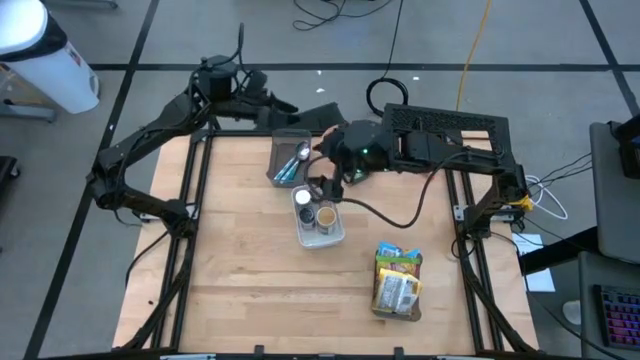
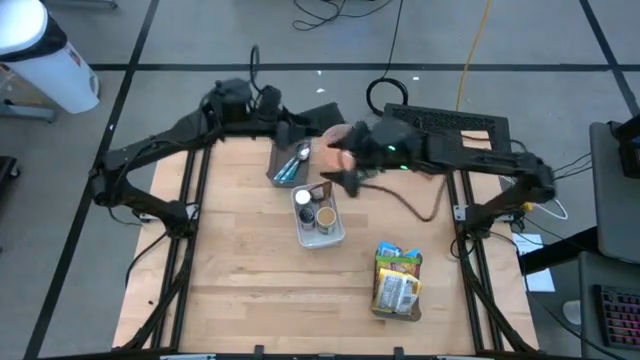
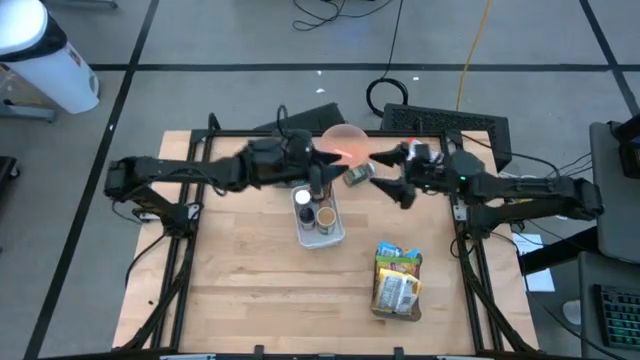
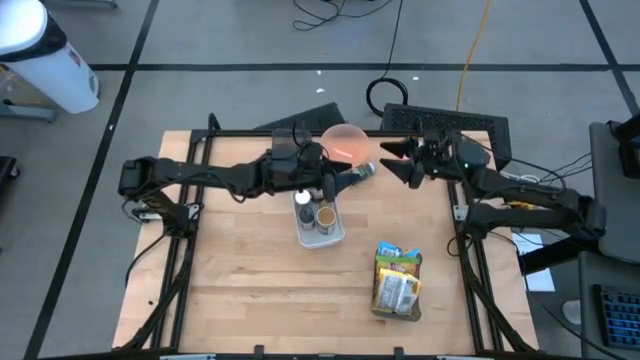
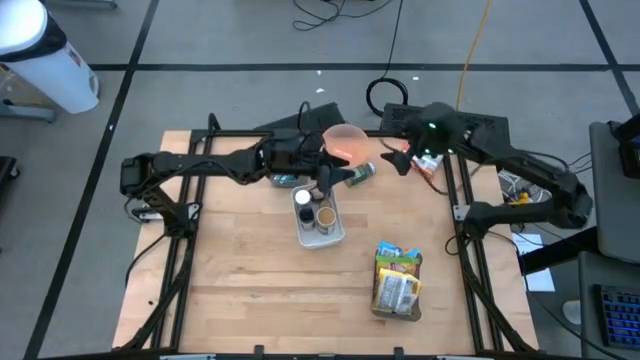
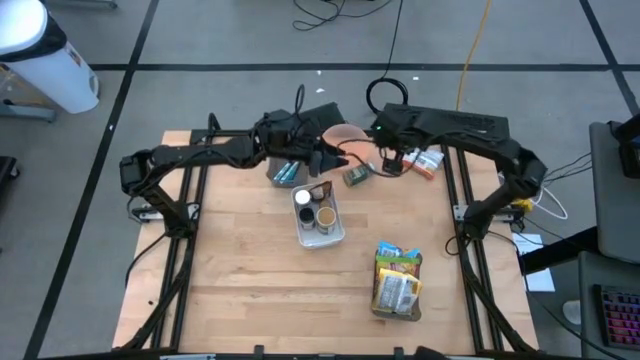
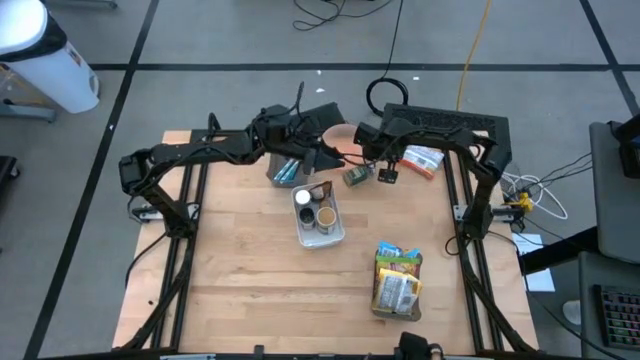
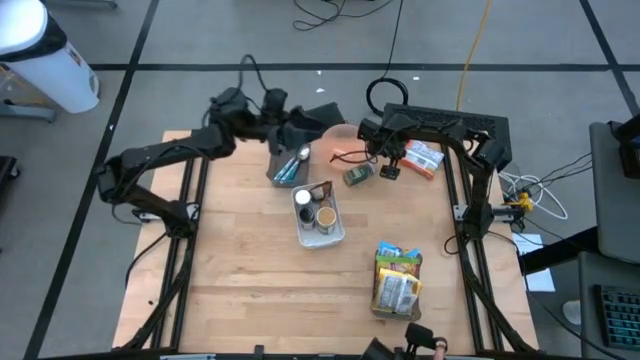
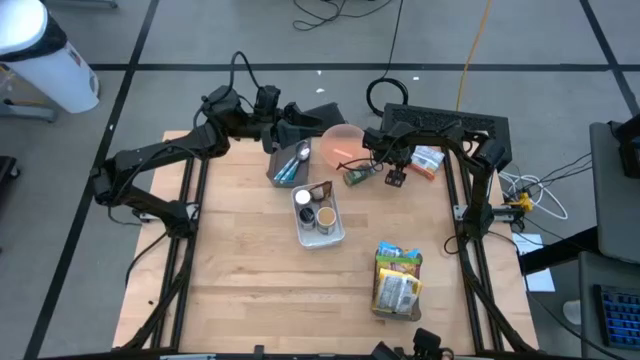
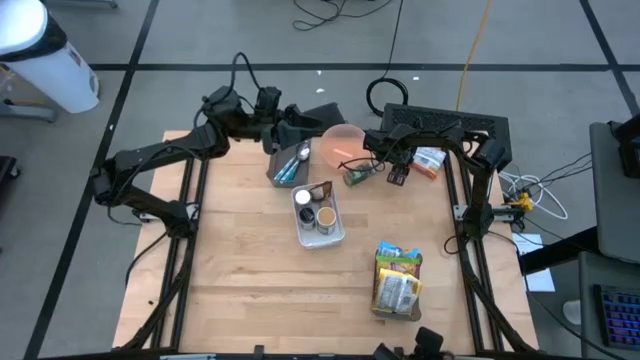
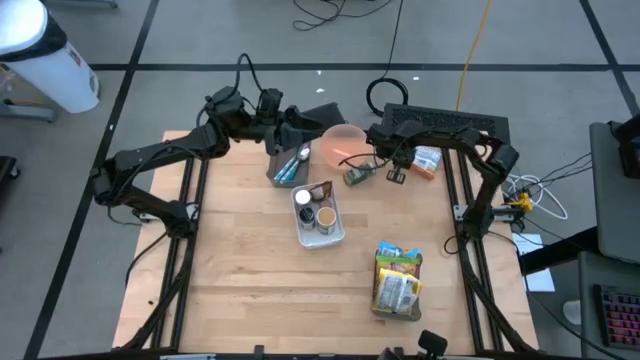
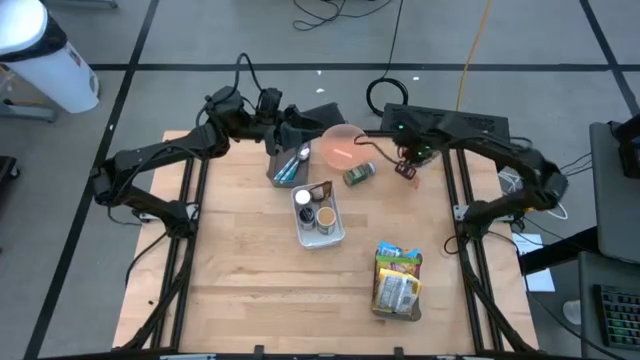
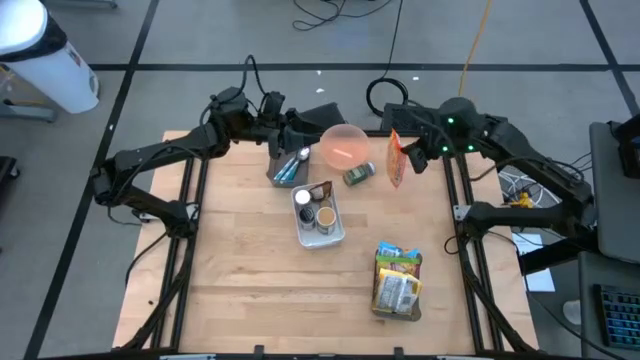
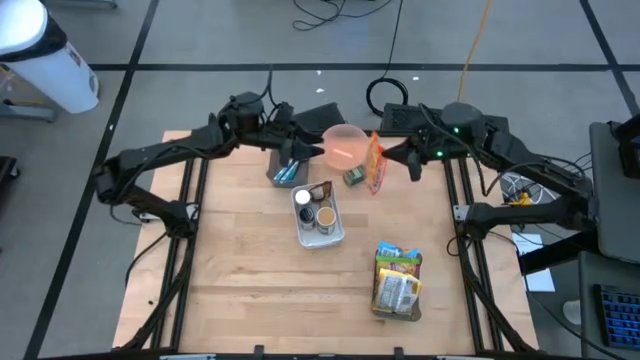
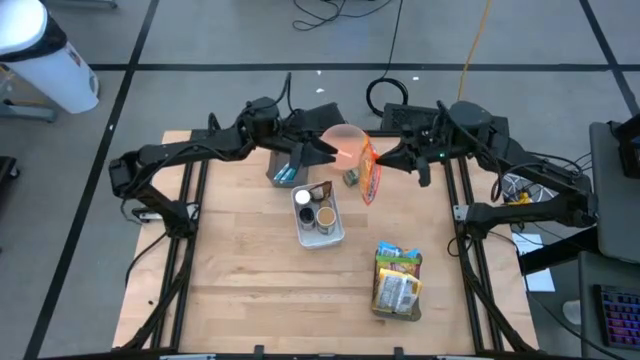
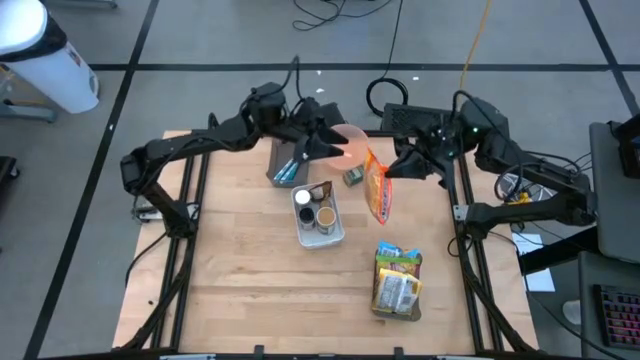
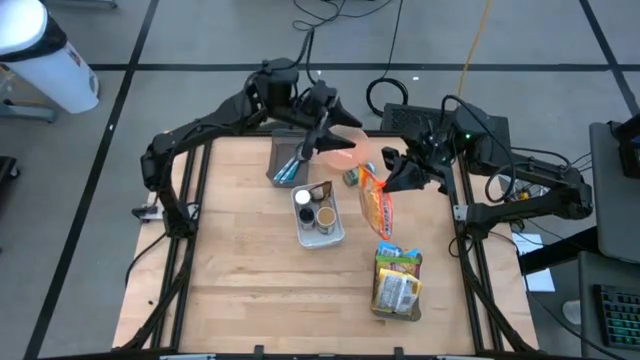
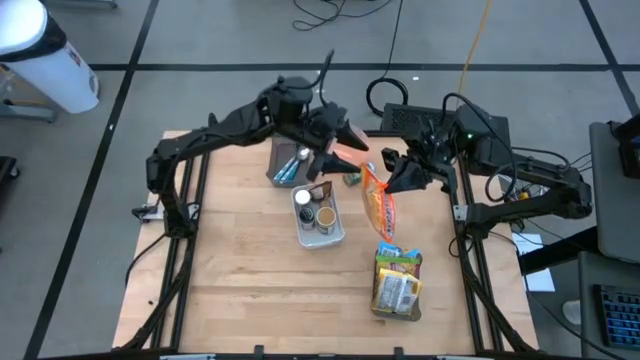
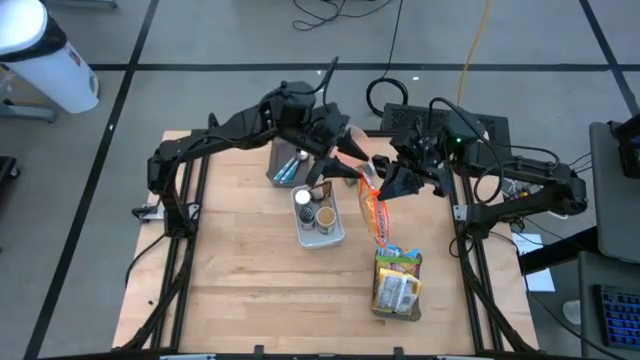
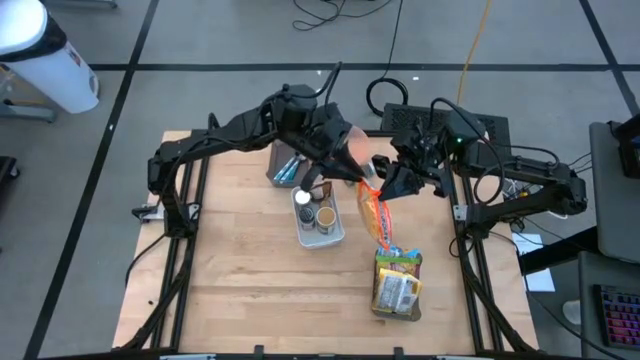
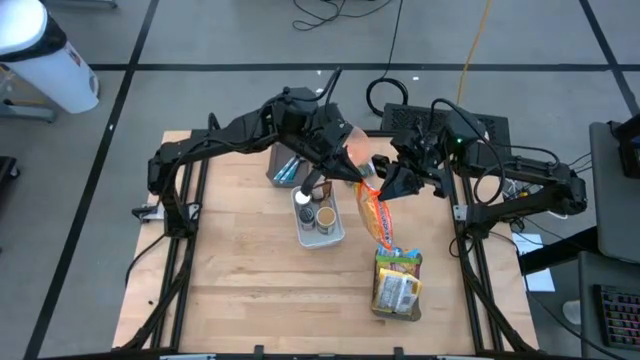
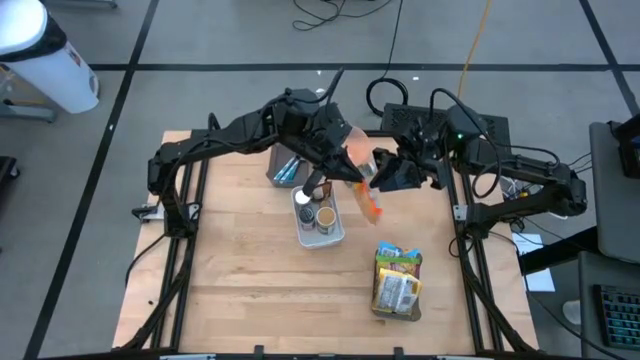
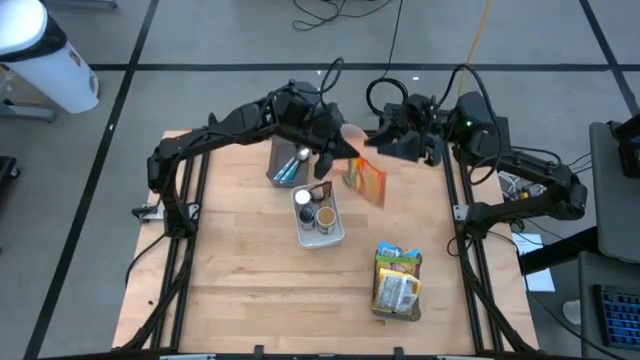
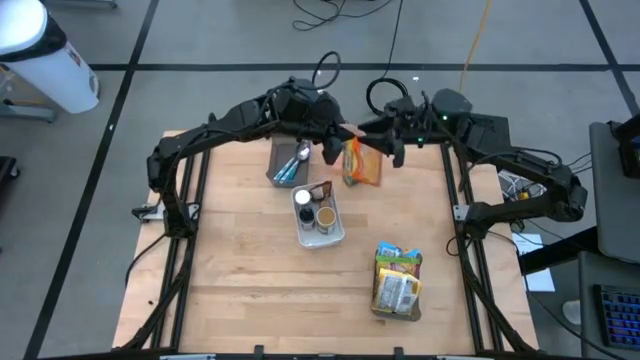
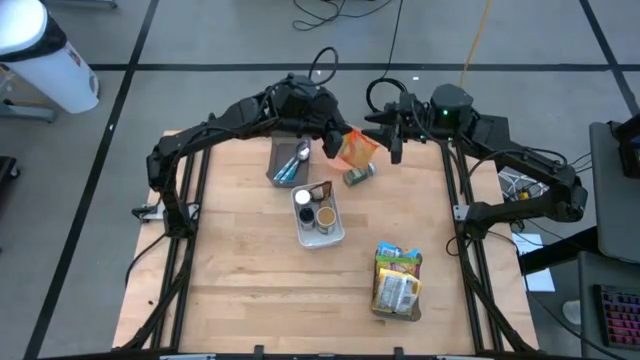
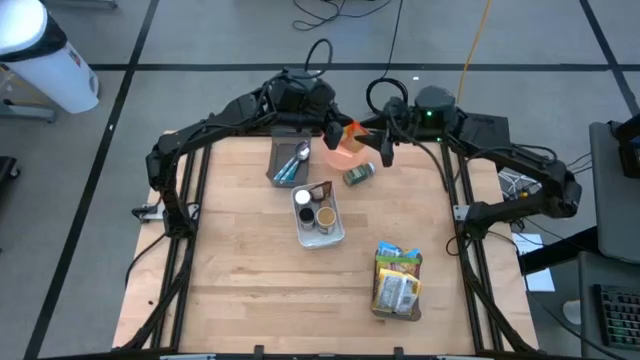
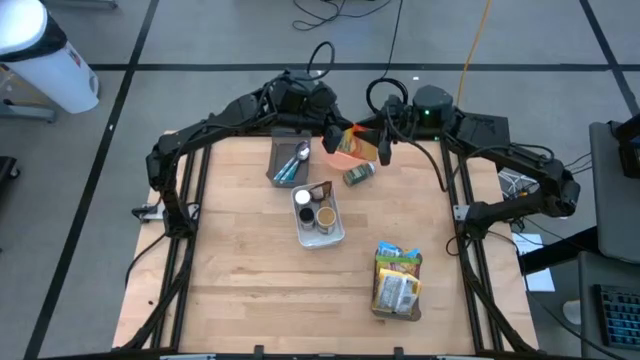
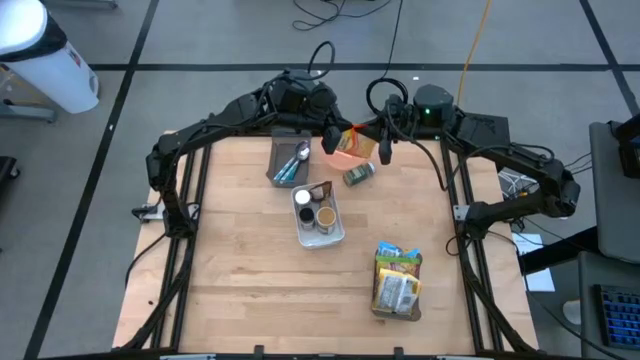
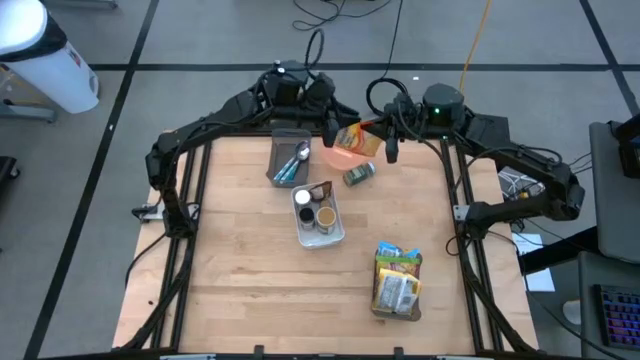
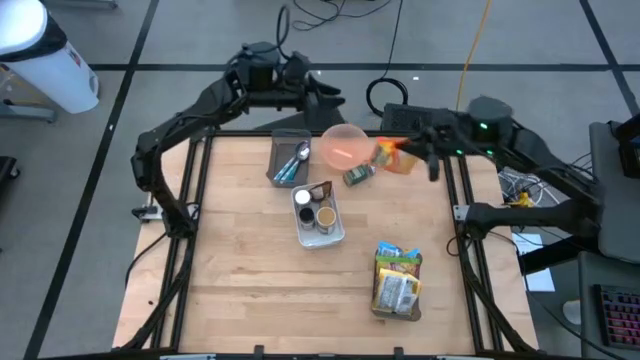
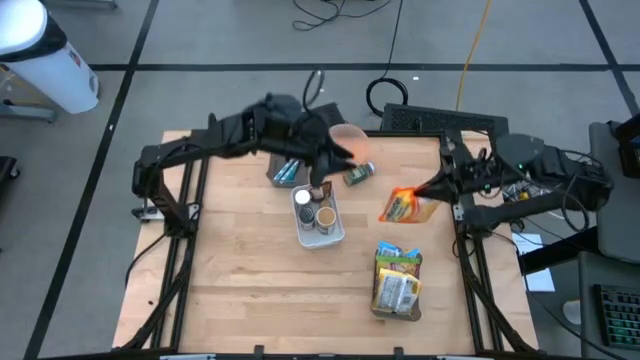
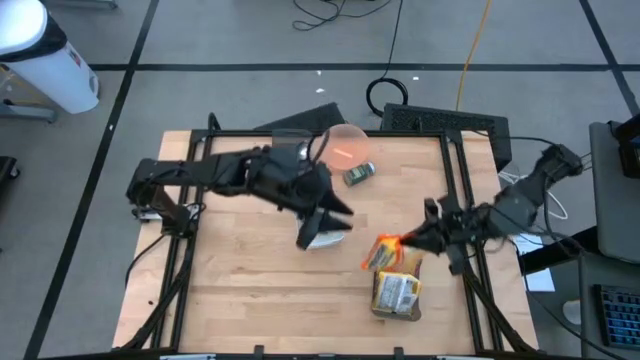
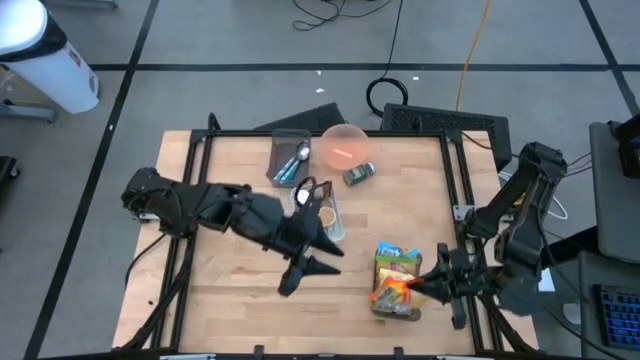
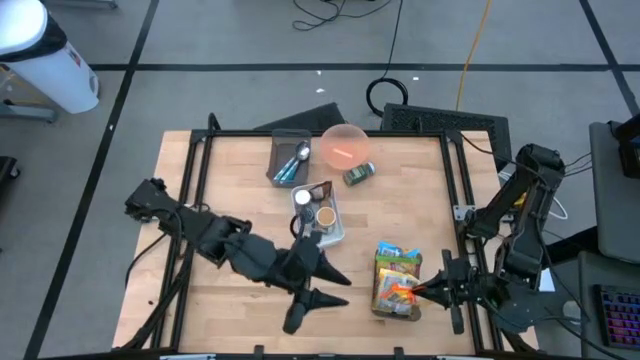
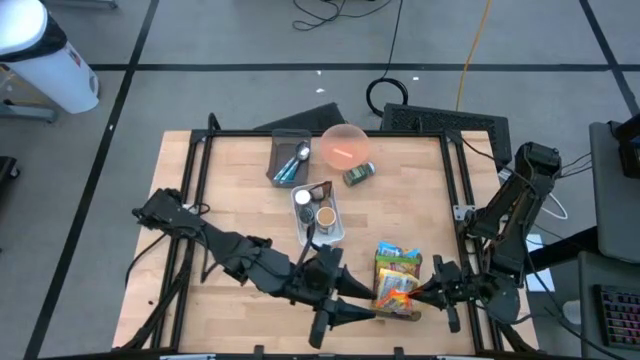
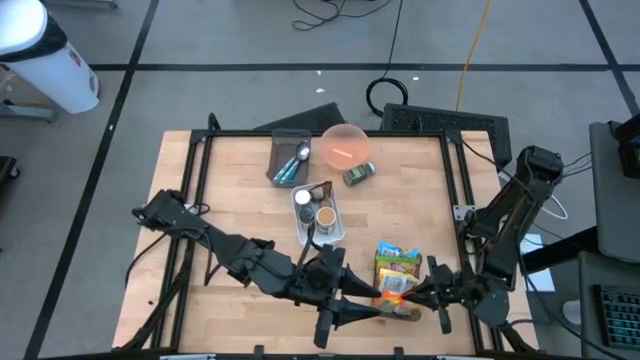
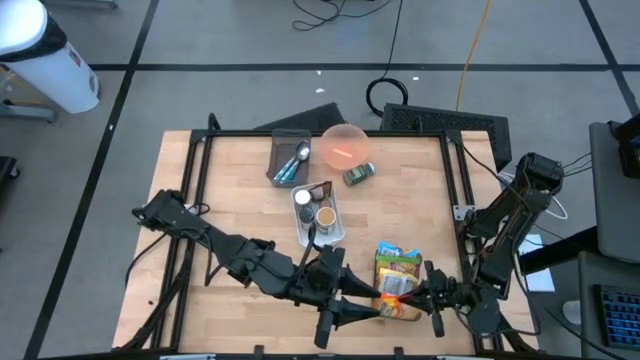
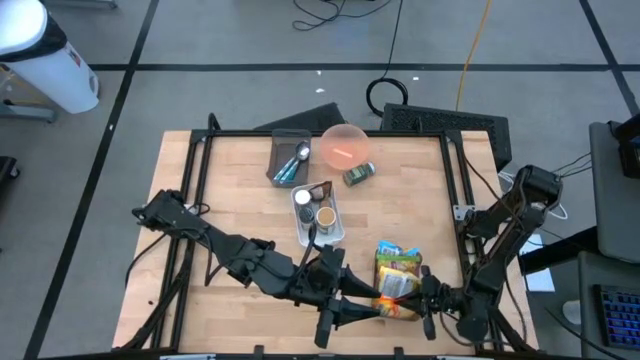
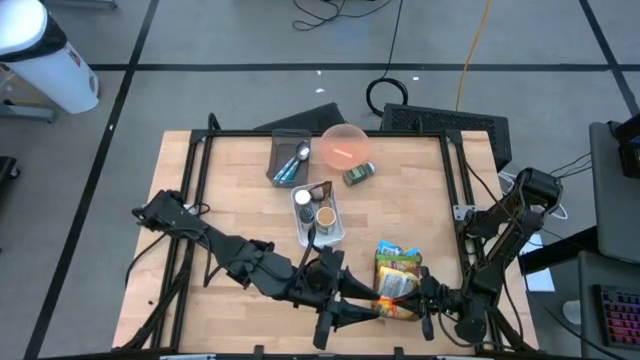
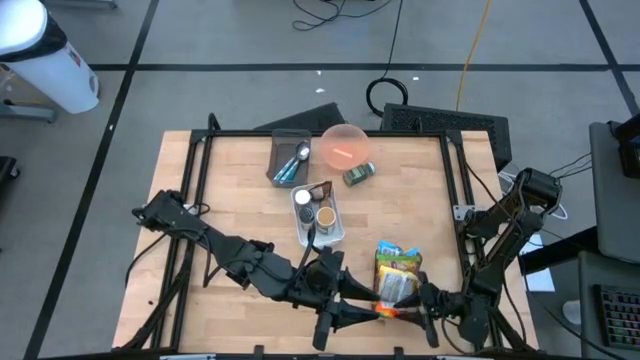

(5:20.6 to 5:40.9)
Task: Pick & Place Food Item
Put orange noodle pack into the bottom black transparent bin
